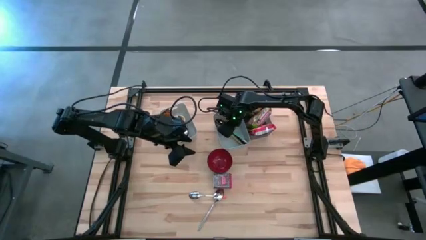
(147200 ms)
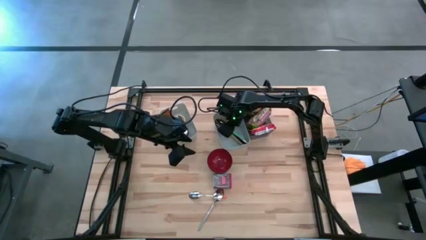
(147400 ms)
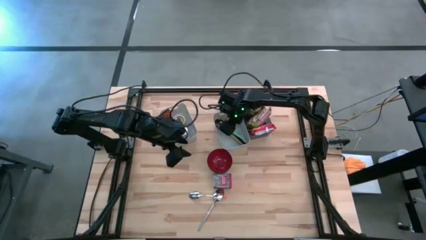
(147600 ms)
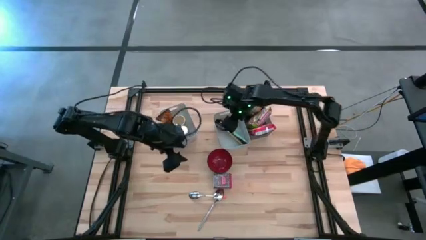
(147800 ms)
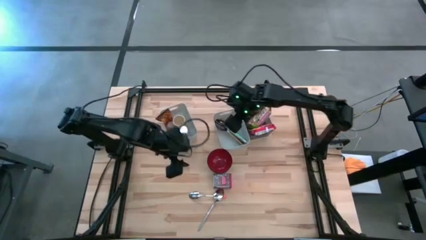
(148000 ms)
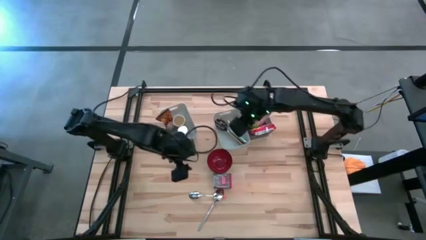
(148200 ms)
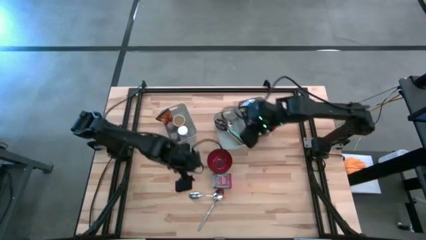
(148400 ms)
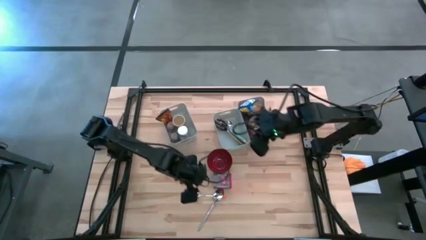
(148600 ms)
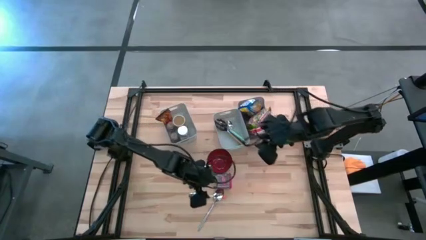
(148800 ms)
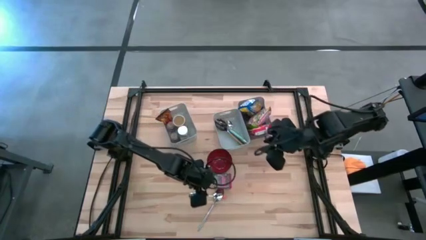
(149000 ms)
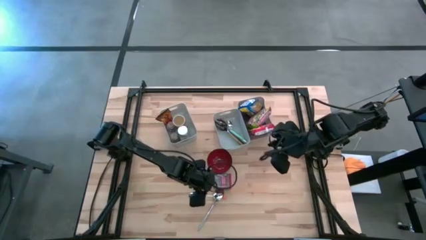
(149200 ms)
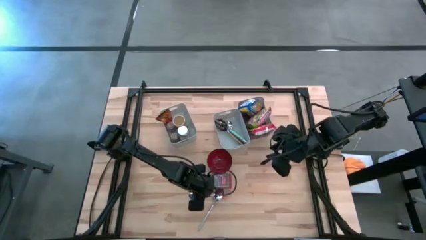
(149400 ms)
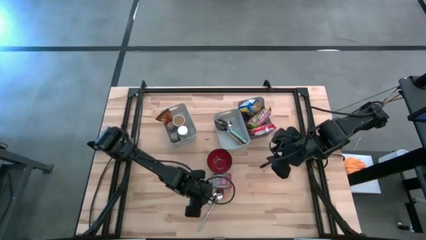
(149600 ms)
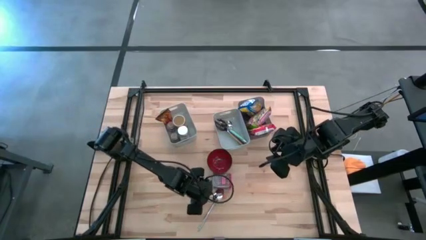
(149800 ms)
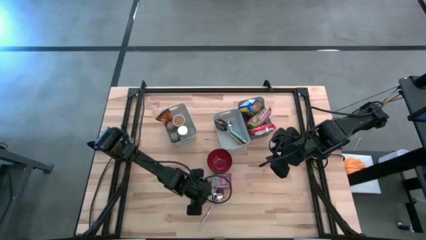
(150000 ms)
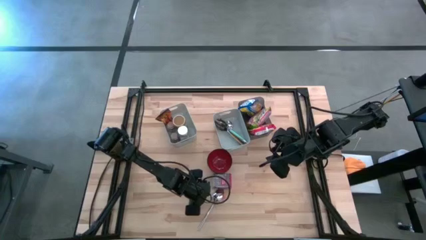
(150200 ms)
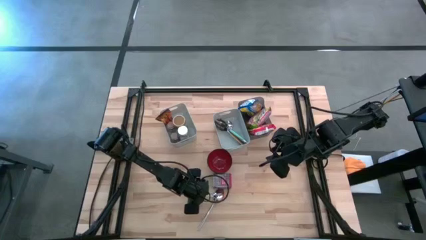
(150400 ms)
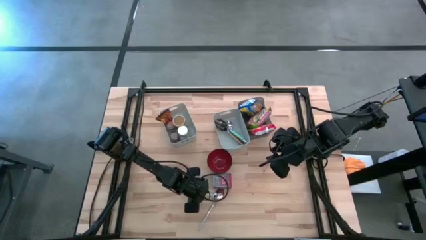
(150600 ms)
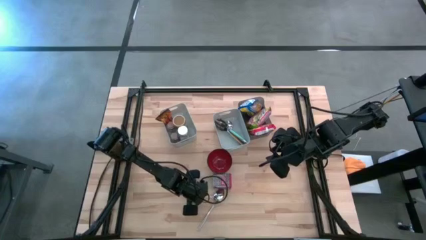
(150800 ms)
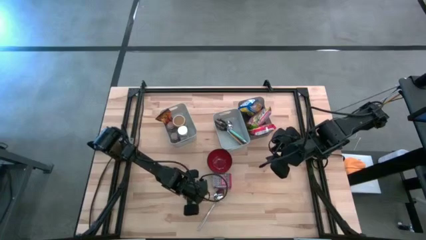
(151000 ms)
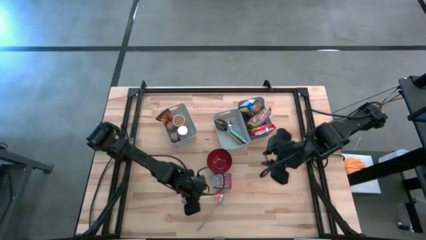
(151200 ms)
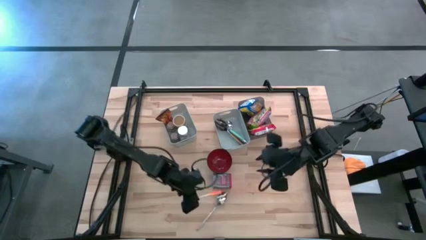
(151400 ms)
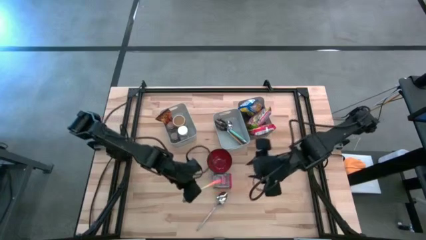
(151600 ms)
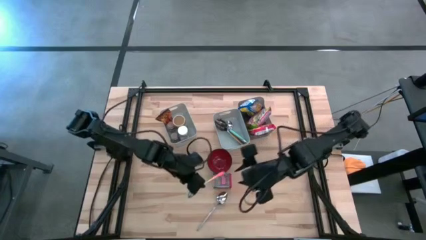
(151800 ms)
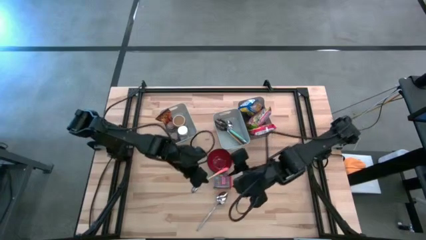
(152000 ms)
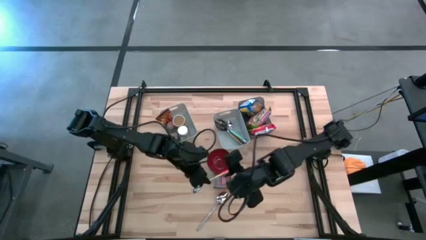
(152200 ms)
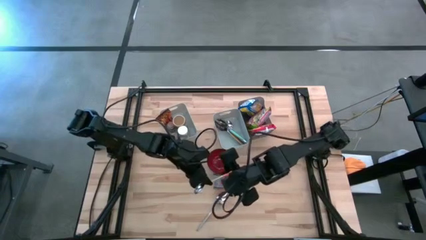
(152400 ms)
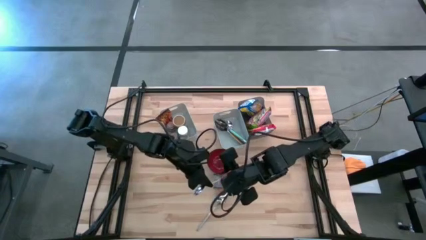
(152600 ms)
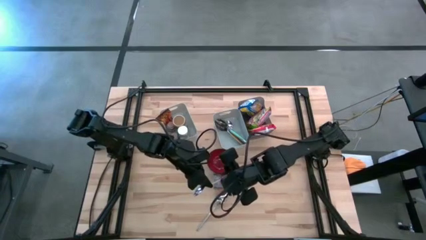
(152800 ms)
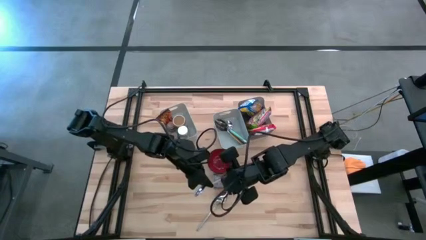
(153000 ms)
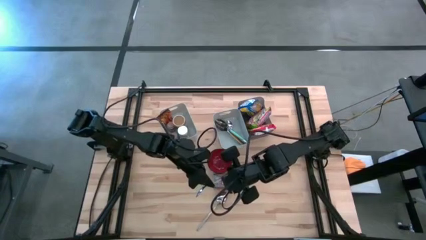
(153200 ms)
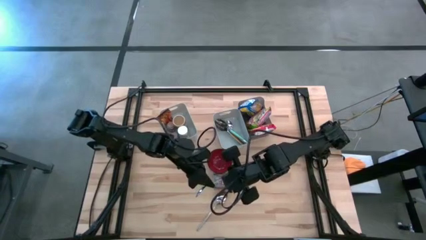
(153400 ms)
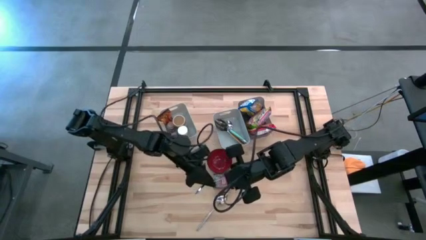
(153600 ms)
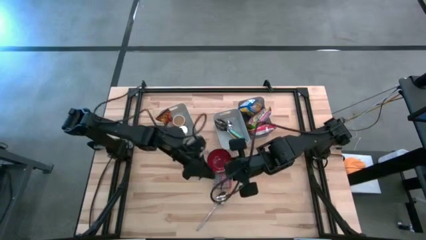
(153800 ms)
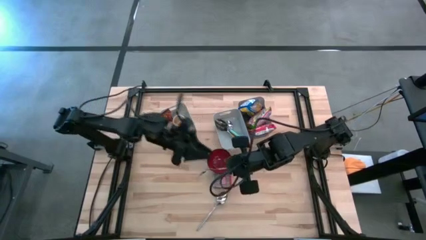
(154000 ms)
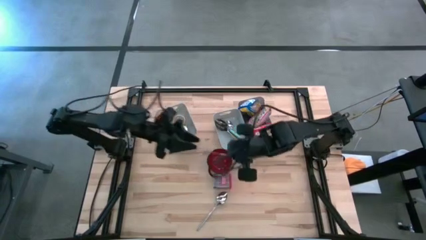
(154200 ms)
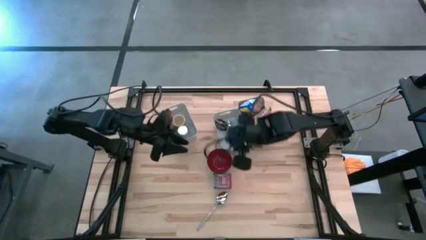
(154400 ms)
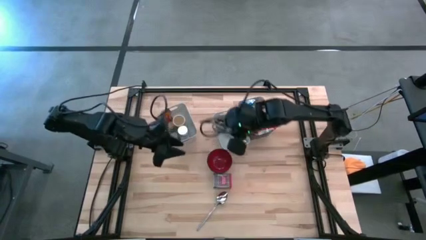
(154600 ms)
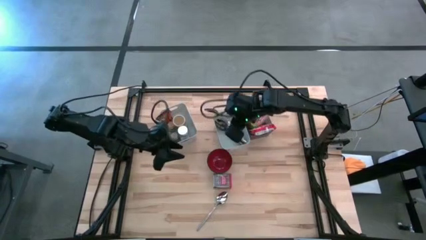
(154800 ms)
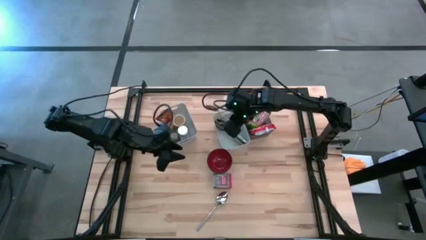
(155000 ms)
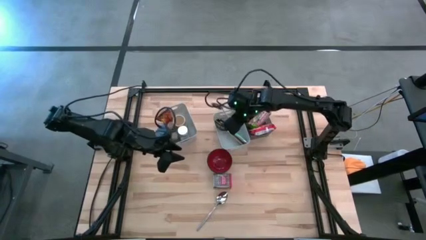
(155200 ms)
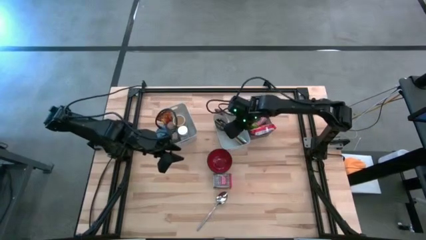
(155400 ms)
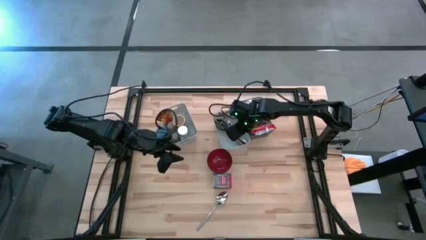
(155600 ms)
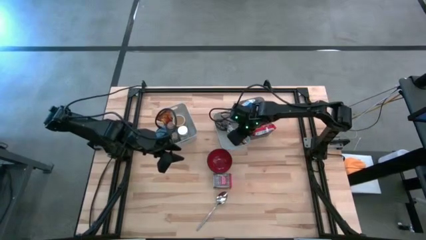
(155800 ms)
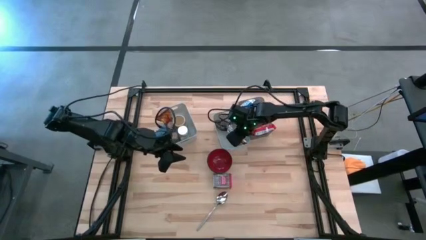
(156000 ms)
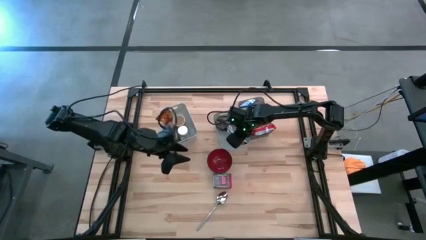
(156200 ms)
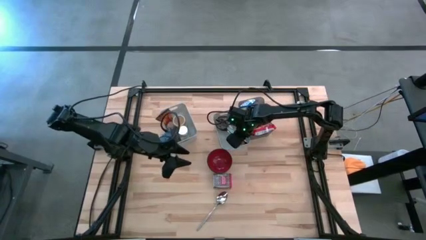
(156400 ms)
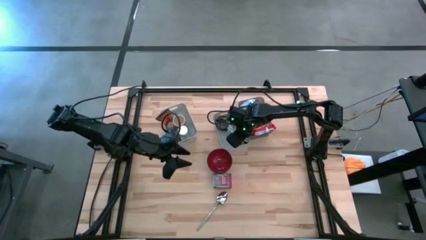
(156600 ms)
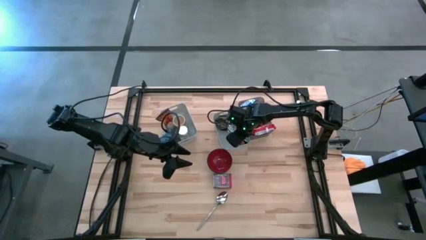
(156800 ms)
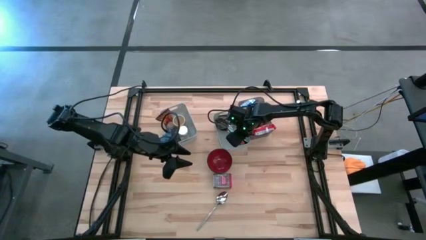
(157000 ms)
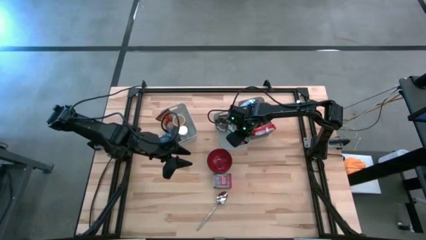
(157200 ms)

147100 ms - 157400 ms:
Put the orange spoon into the right white bin

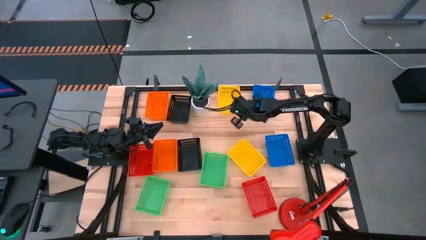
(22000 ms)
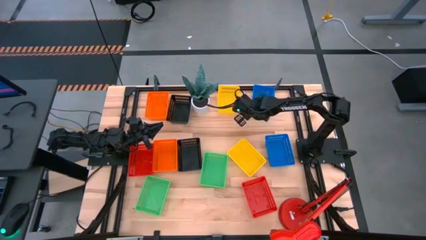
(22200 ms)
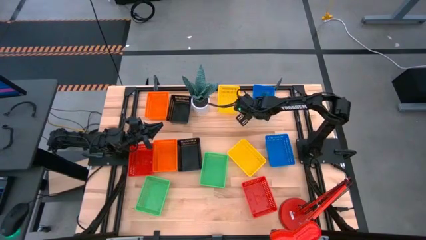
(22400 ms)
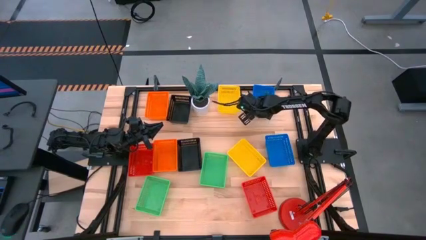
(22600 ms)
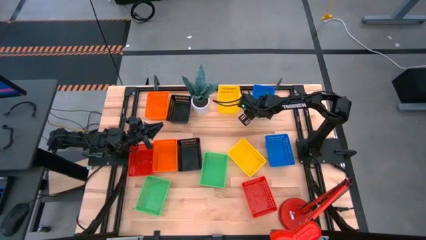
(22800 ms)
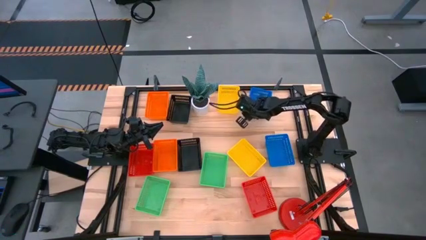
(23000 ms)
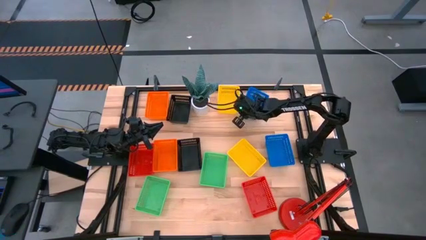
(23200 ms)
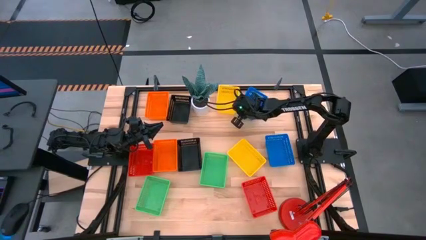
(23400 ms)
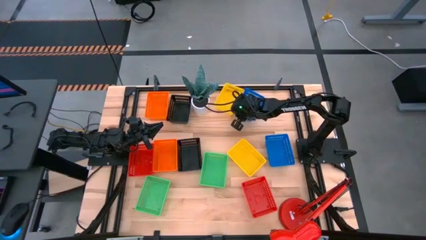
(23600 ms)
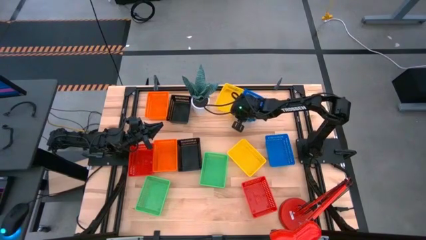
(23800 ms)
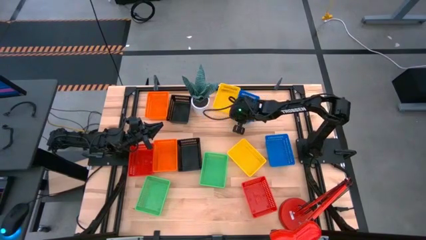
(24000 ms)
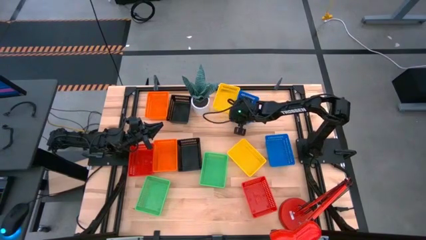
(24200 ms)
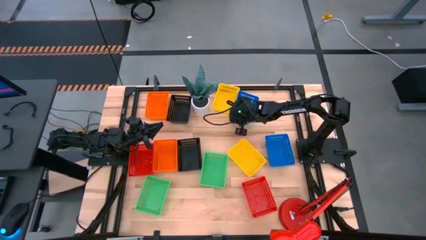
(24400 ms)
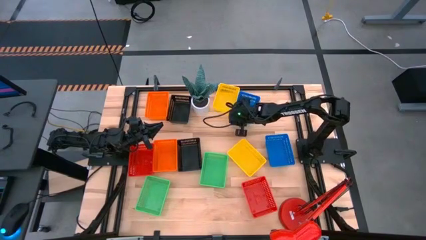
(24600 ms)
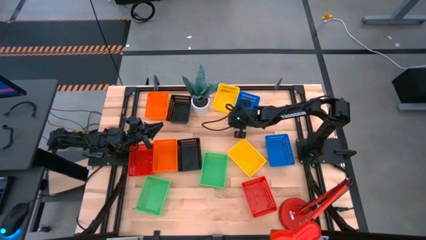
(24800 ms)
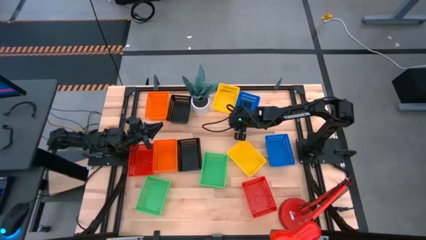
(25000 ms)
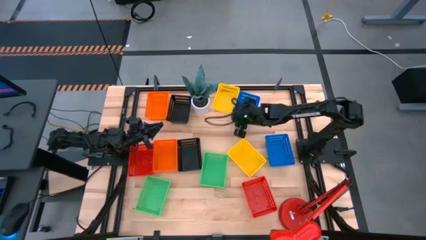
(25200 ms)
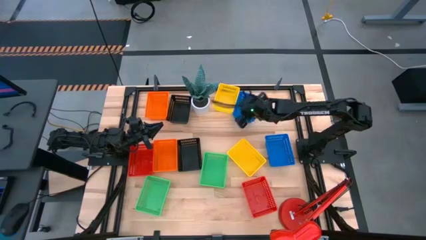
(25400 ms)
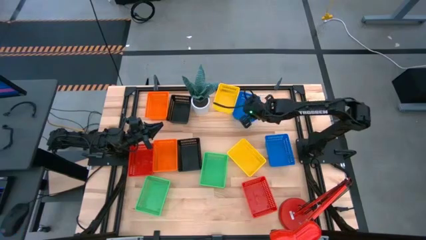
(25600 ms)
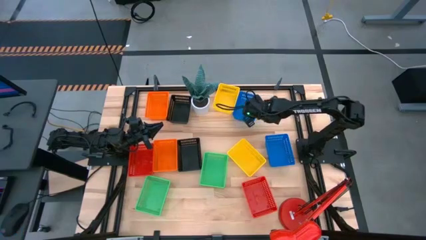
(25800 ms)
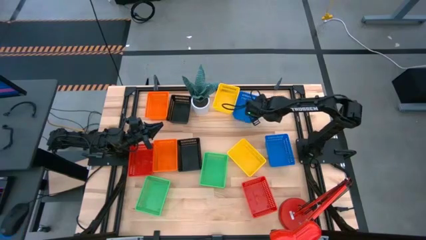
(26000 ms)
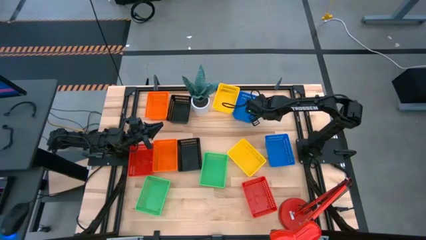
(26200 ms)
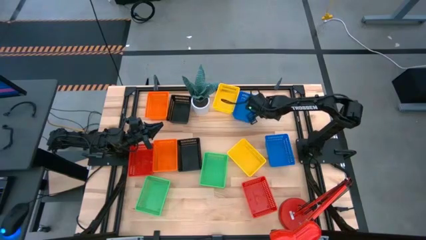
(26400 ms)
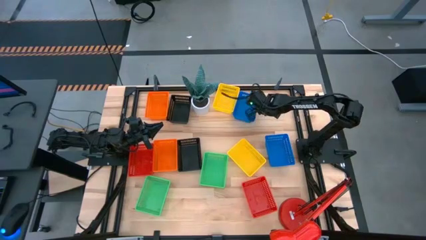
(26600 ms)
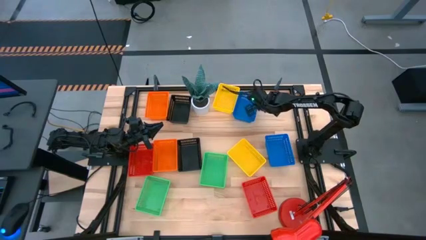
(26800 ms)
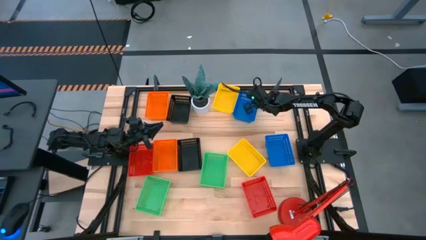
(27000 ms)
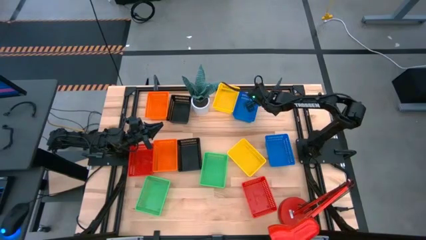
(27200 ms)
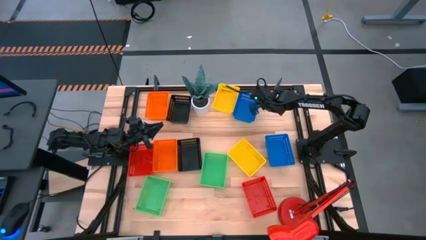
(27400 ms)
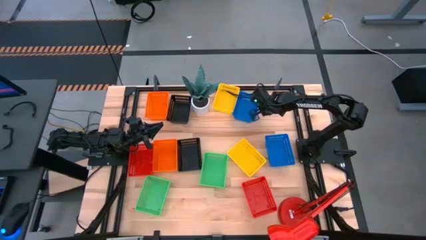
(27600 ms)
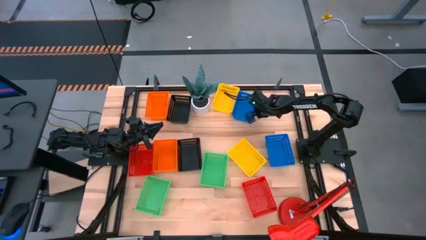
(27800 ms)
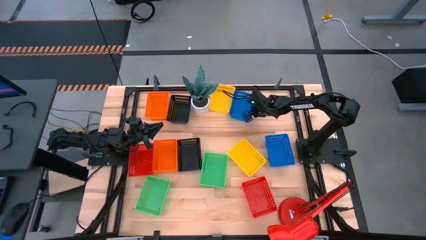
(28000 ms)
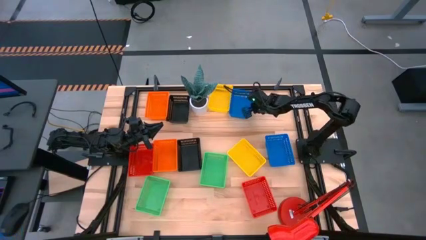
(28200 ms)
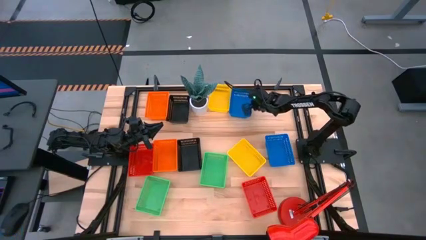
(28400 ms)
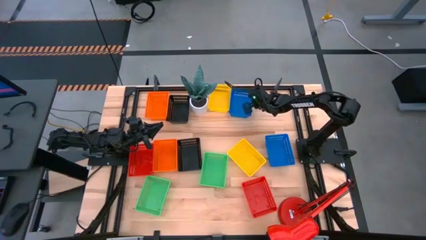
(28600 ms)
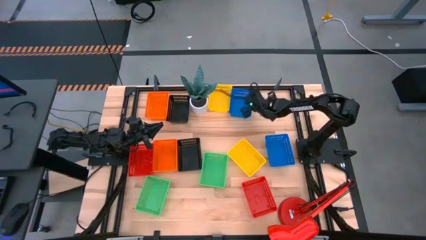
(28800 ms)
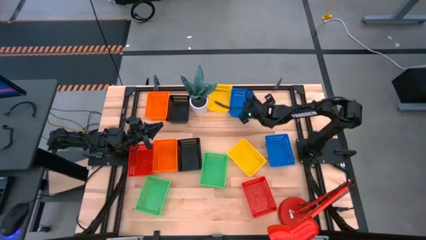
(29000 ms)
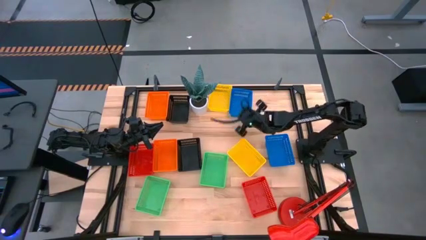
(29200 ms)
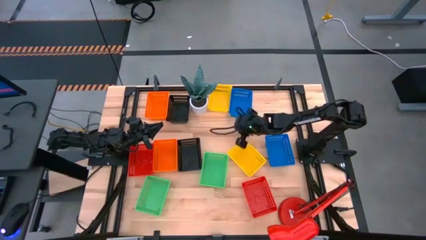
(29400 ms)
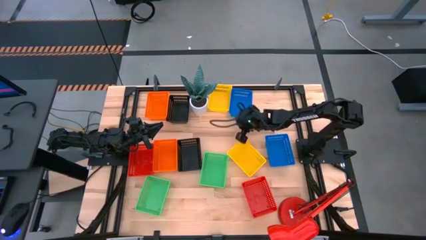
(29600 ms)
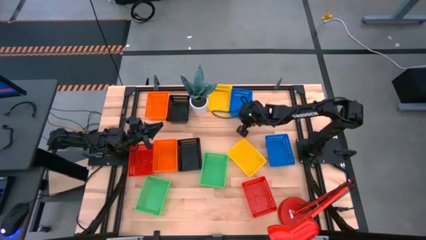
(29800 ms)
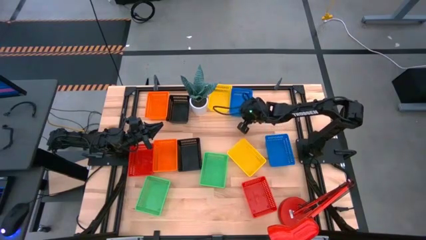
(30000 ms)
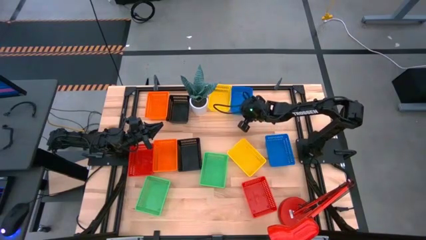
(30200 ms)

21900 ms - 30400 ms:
Adjust the top blue bin
